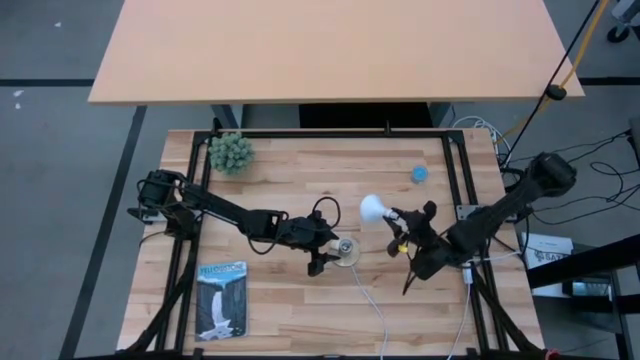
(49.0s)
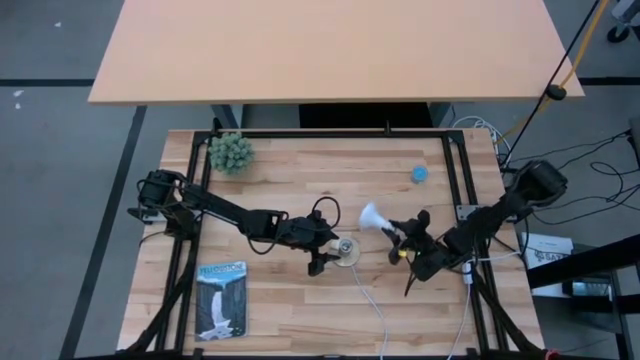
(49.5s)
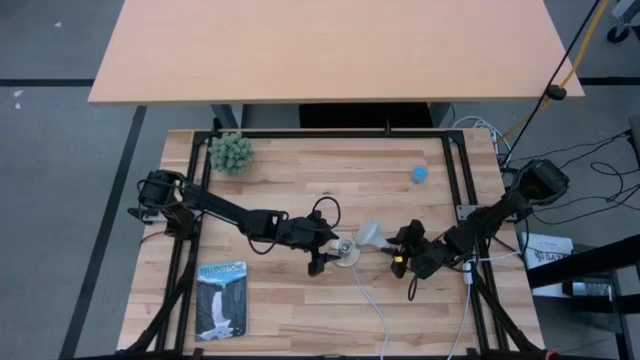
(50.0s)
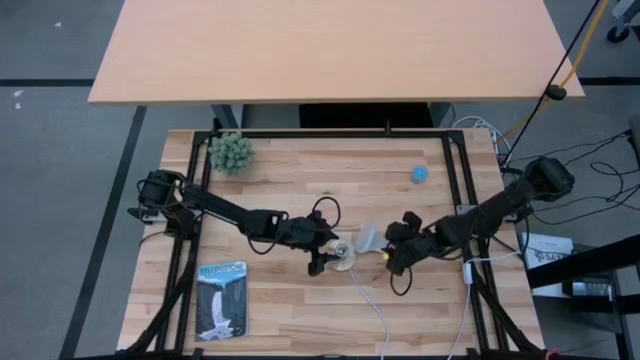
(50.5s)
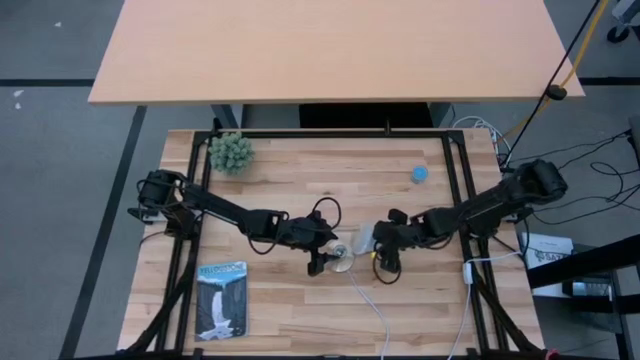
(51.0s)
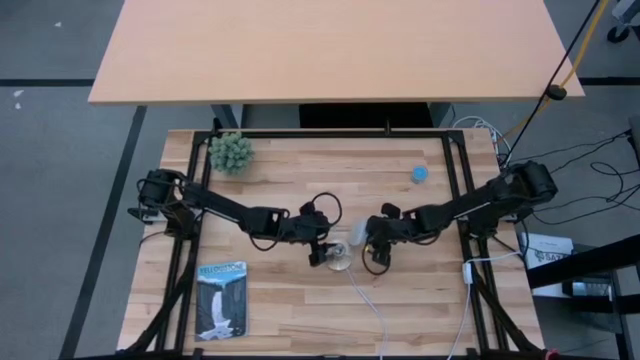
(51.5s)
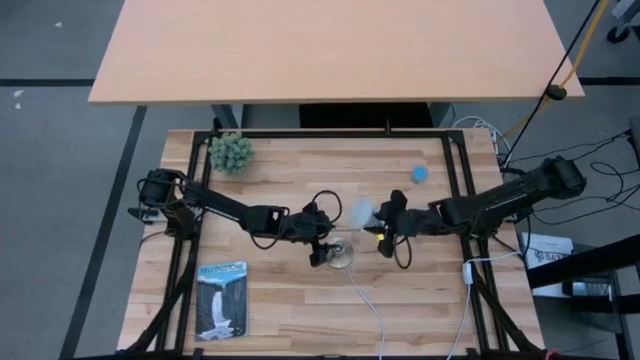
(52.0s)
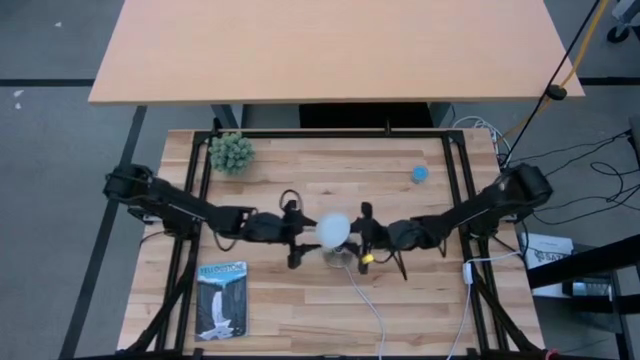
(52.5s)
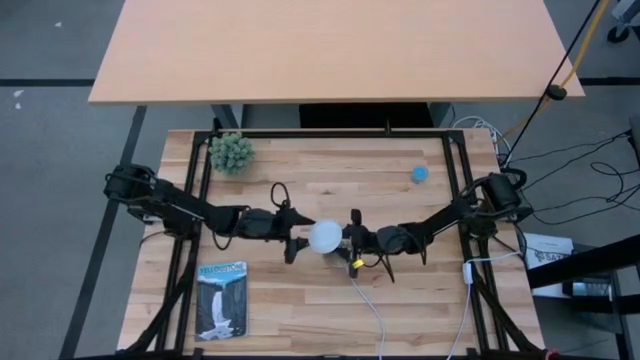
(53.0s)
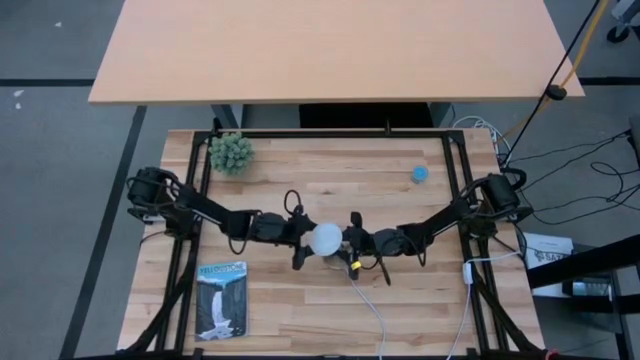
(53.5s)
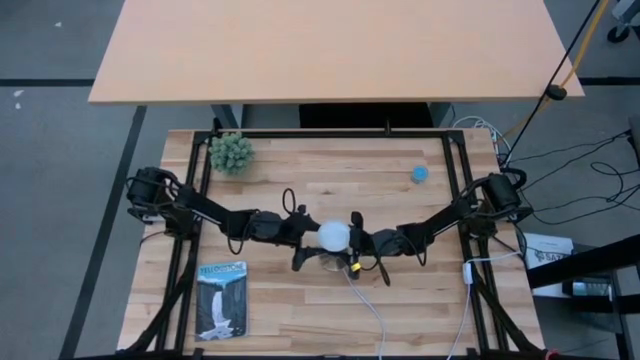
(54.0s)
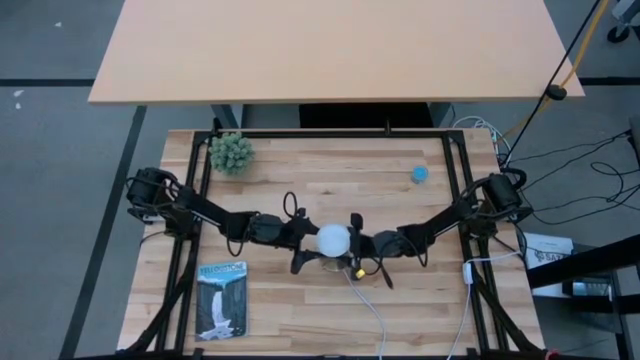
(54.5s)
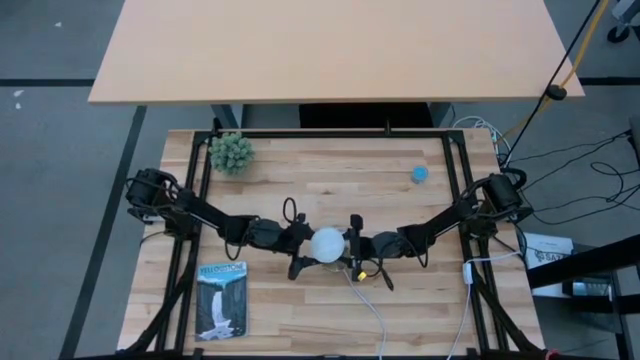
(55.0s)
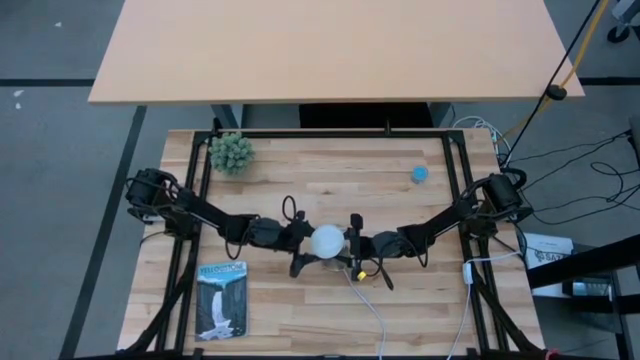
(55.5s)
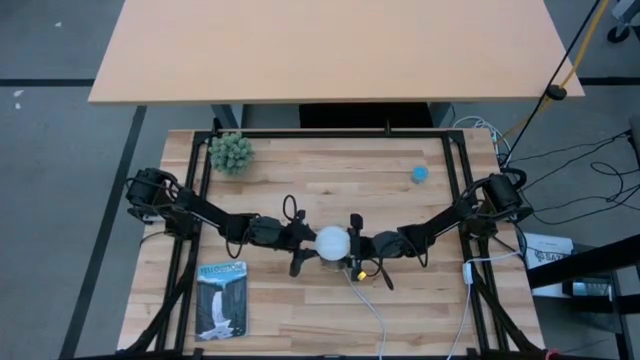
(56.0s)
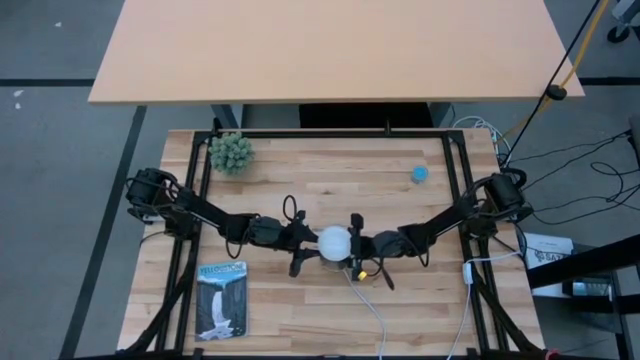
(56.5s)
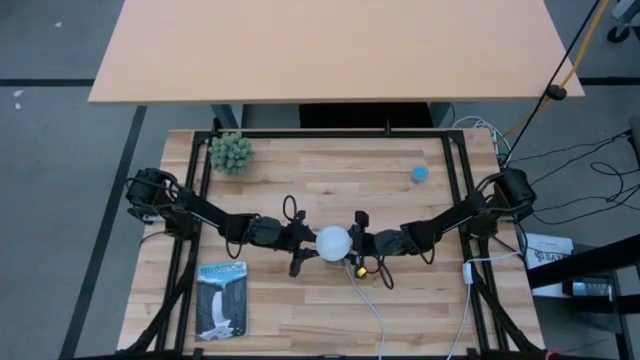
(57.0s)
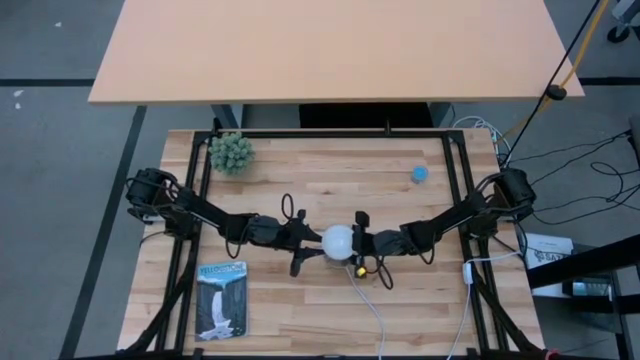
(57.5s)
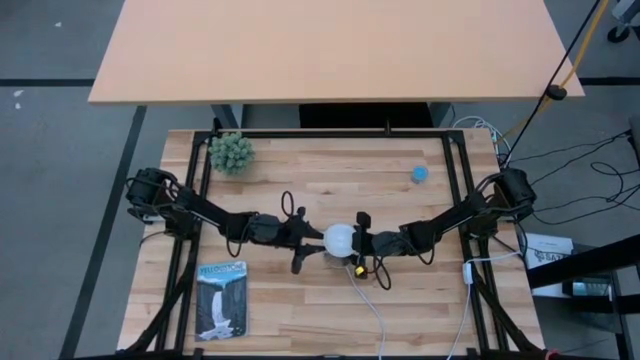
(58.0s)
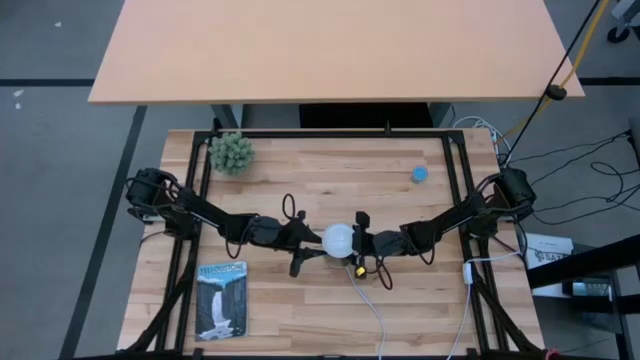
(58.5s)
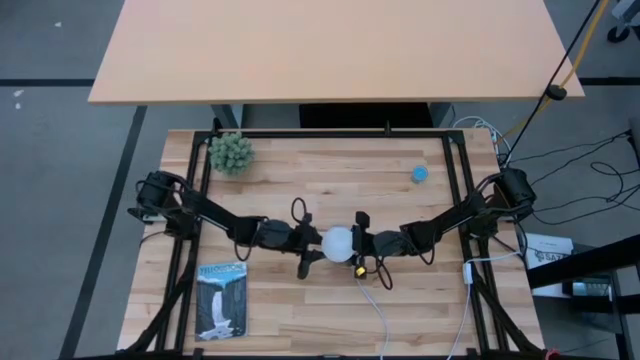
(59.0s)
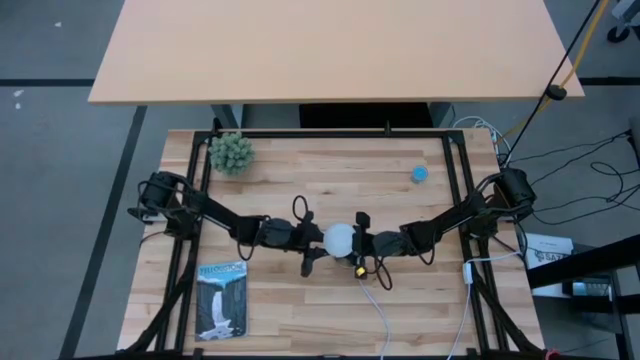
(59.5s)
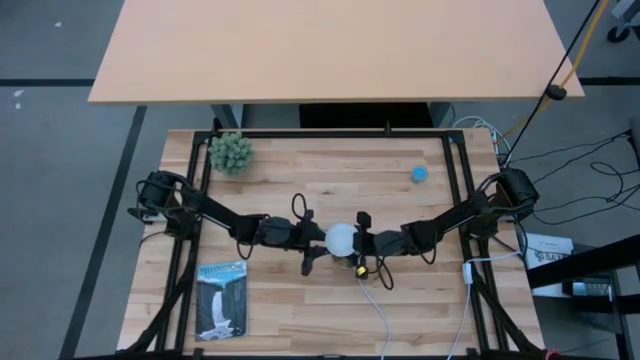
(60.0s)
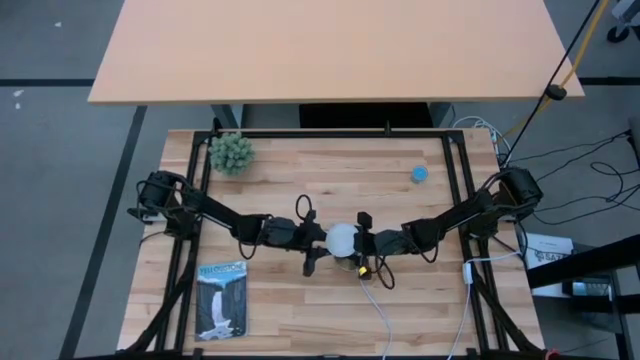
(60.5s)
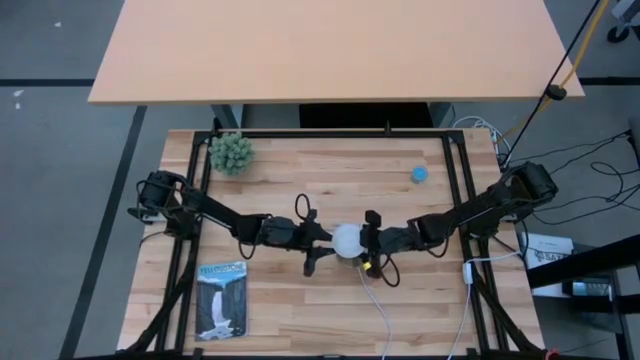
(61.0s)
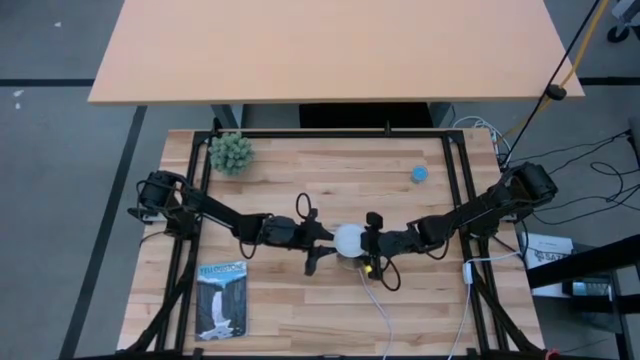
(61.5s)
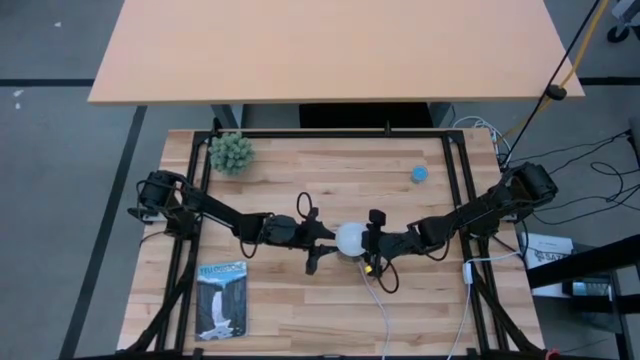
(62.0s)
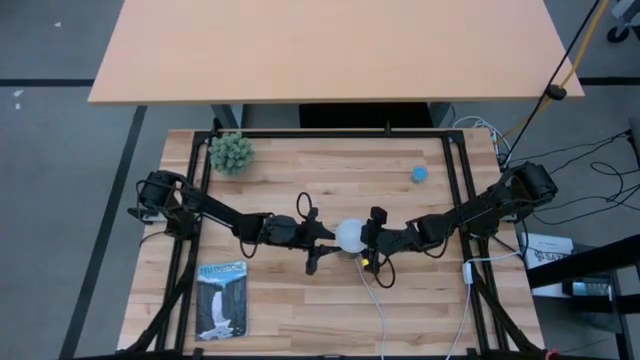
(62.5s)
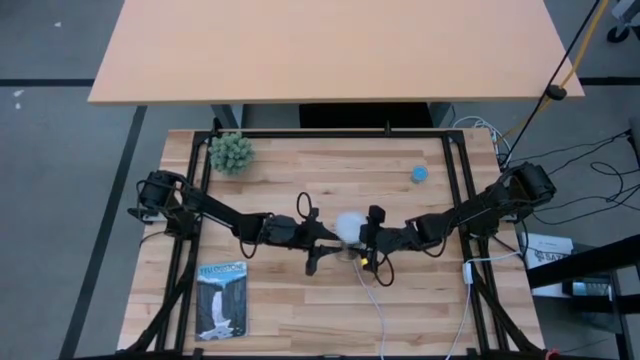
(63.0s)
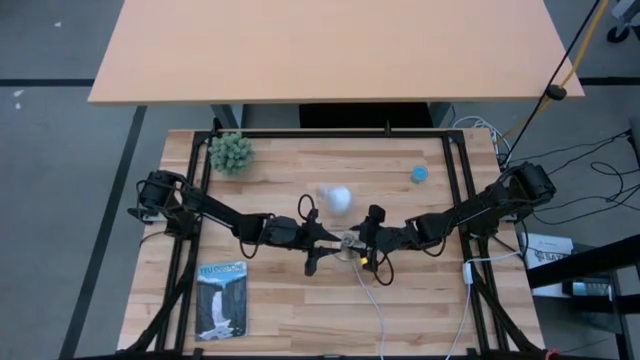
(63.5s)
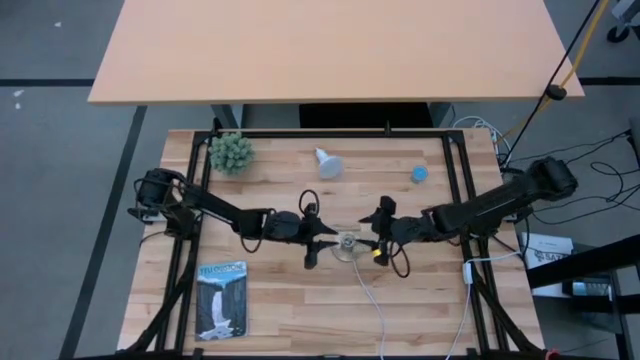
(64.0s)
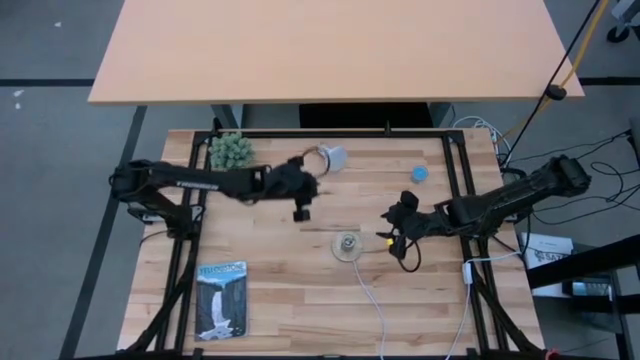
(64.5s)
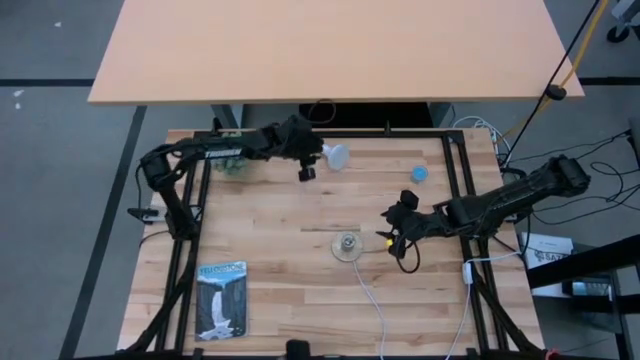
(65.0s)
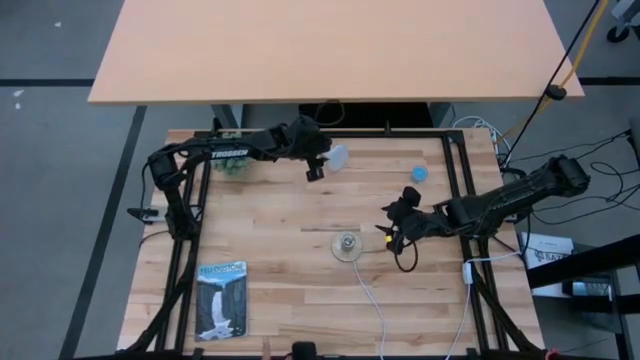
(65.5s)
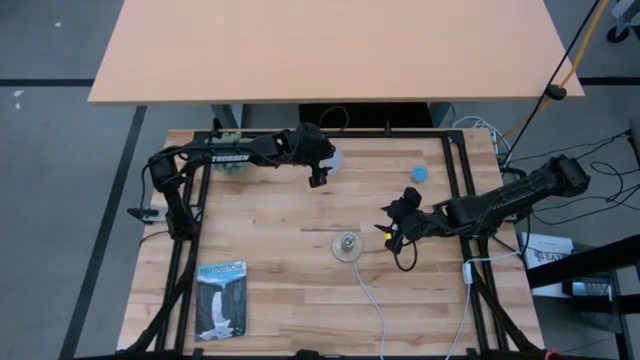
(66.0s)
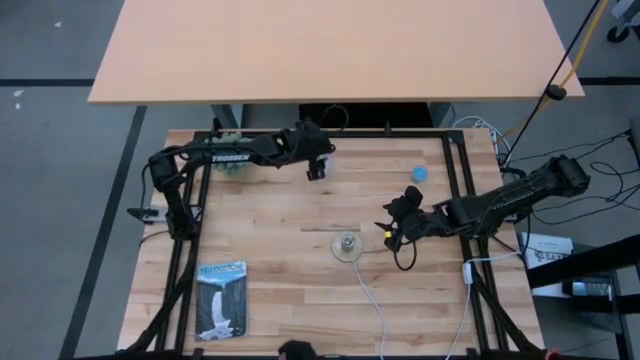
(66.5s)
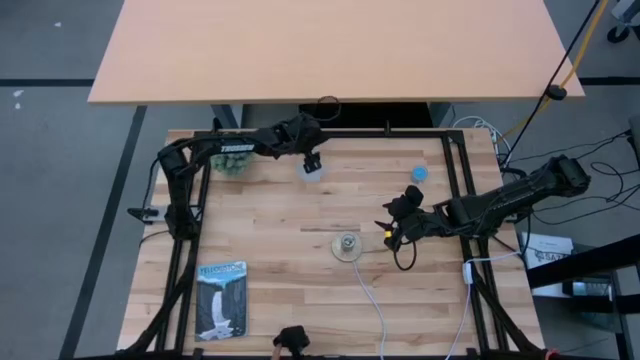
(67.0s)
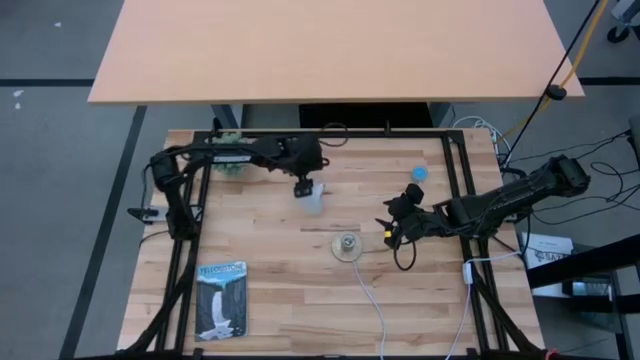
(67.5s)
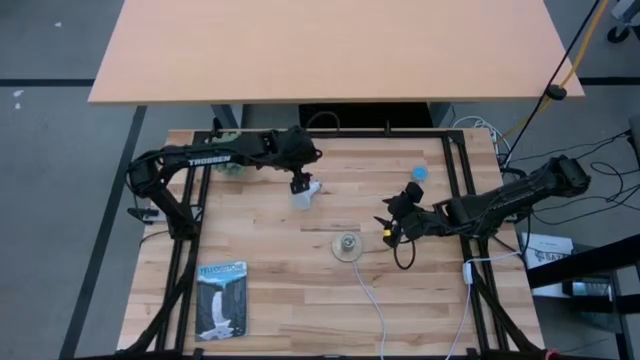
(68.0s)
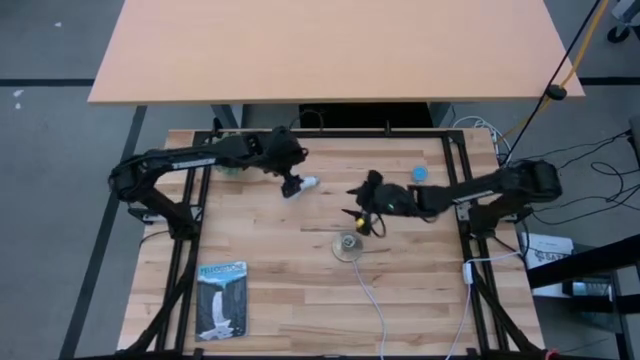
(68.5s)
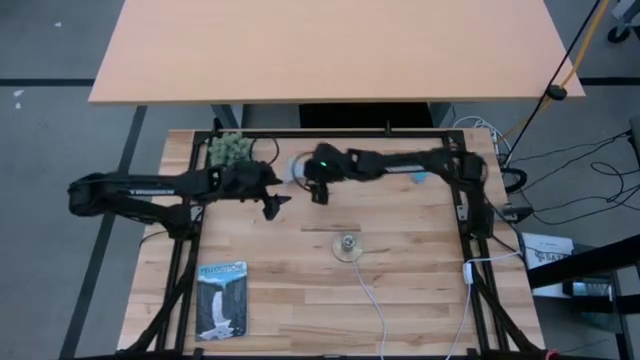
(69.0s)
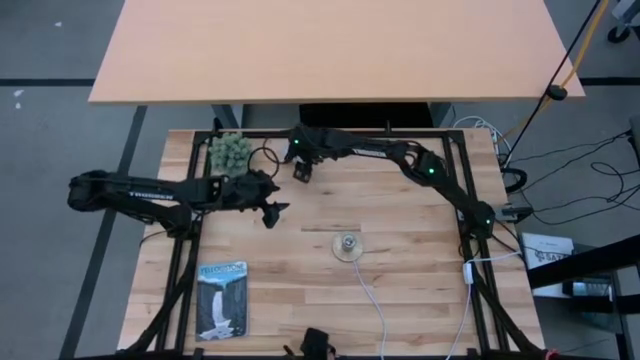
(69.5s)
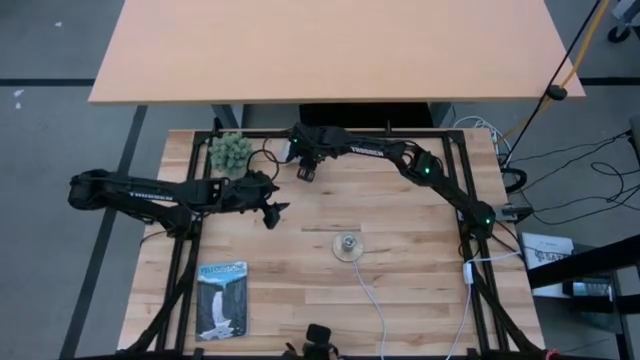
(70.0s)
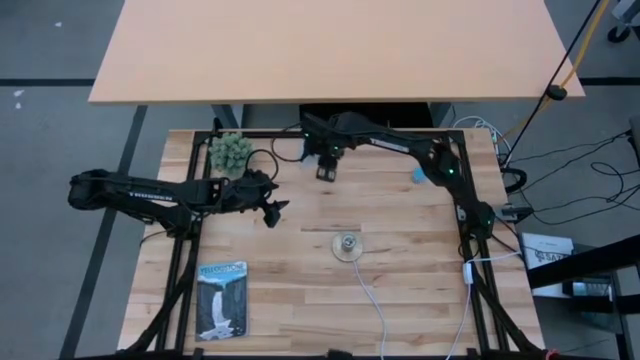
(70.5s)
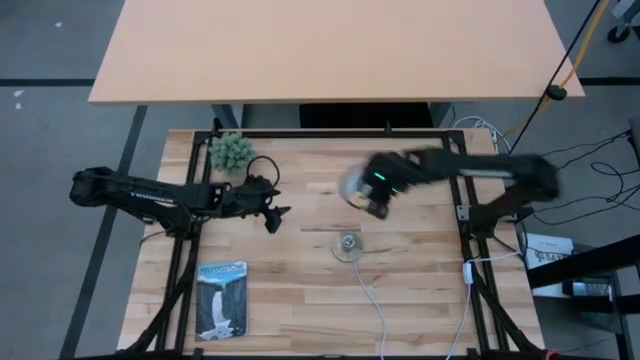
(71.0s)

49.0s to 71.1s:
Task: Screw lightbulb
Insert the lightbulb into the desk lamp
